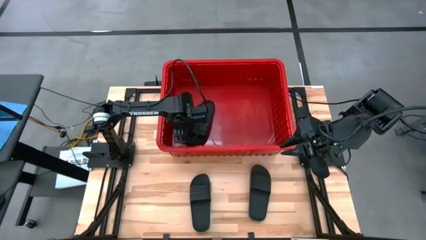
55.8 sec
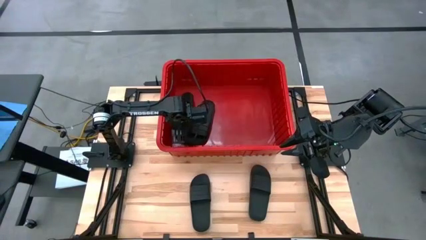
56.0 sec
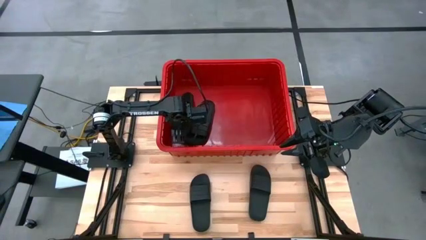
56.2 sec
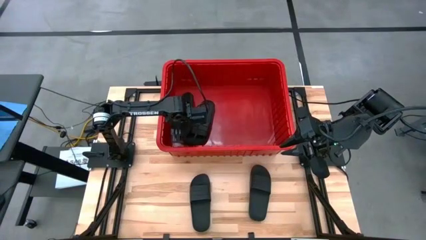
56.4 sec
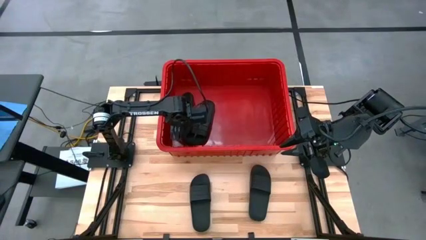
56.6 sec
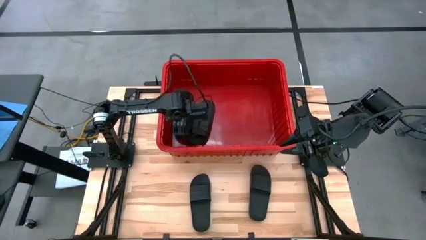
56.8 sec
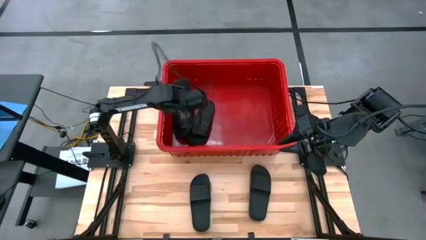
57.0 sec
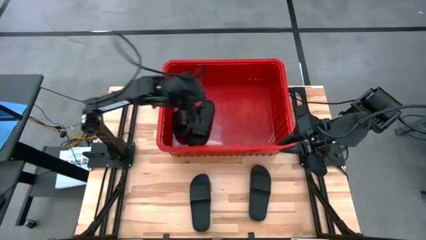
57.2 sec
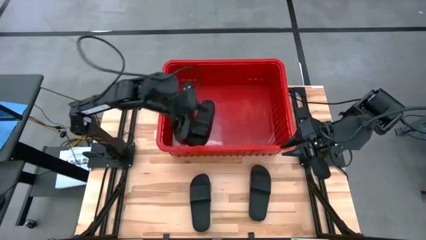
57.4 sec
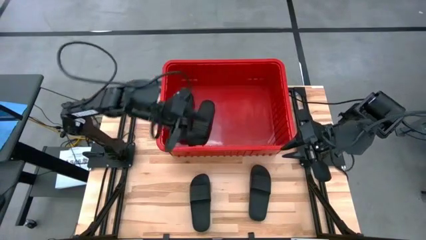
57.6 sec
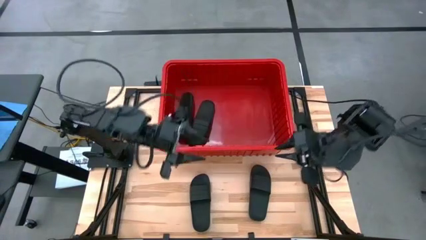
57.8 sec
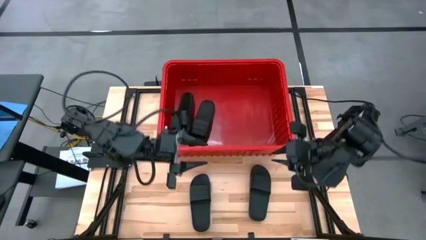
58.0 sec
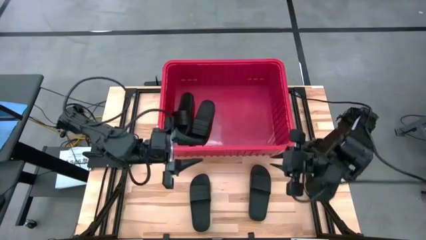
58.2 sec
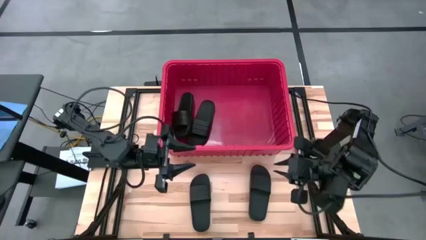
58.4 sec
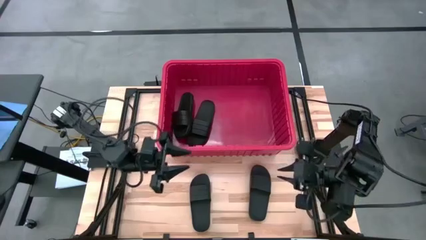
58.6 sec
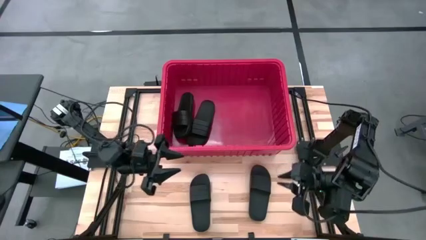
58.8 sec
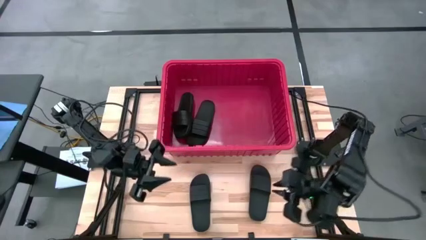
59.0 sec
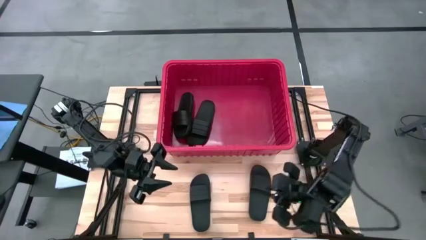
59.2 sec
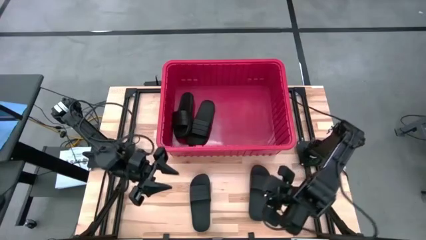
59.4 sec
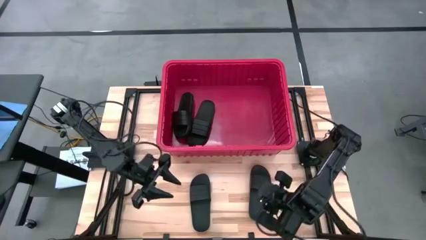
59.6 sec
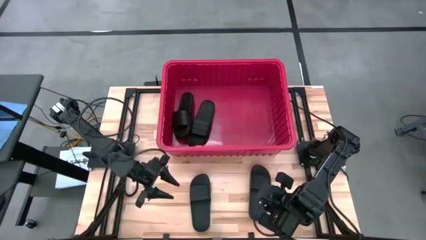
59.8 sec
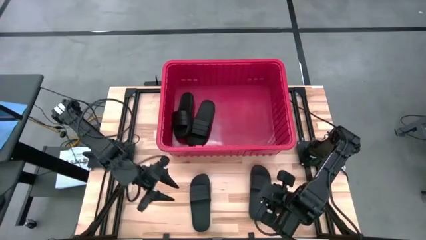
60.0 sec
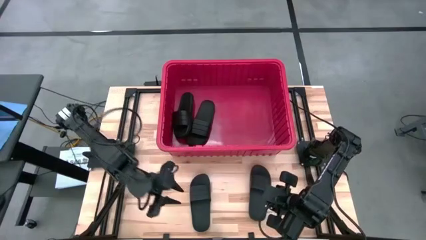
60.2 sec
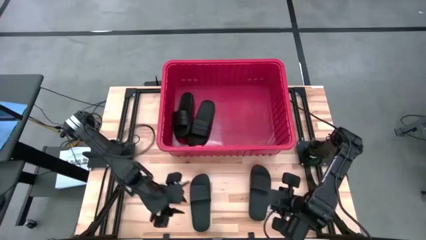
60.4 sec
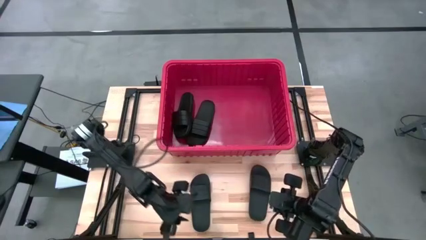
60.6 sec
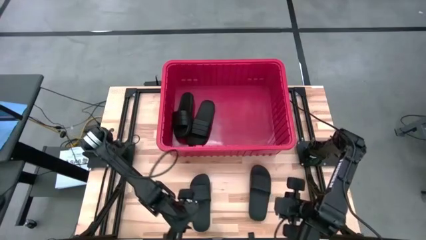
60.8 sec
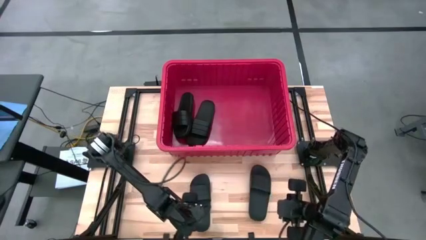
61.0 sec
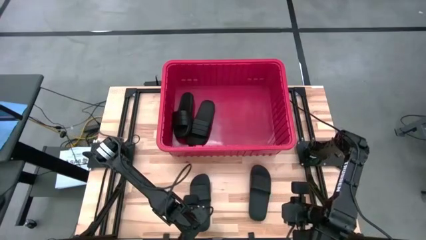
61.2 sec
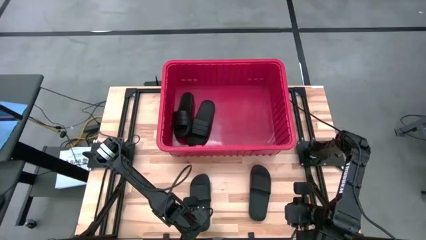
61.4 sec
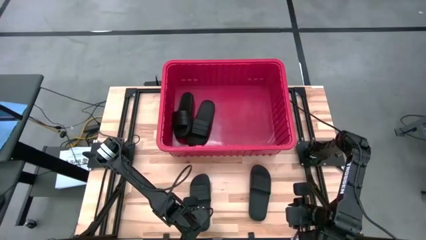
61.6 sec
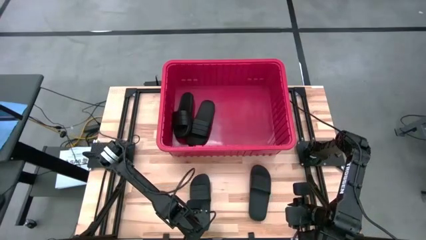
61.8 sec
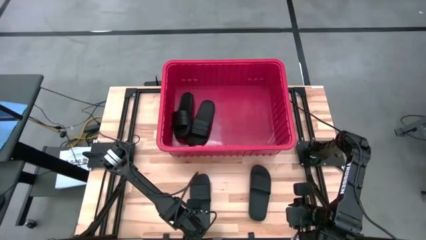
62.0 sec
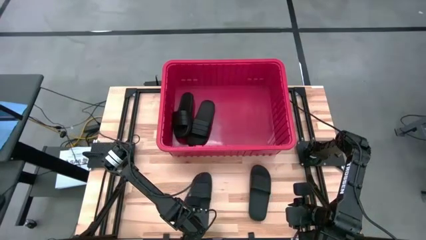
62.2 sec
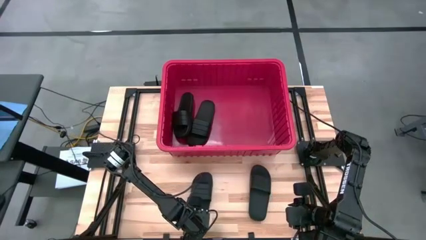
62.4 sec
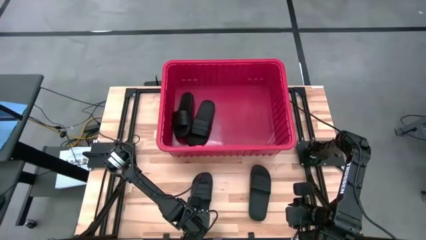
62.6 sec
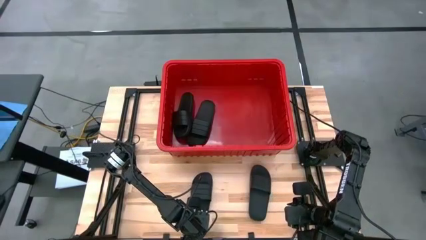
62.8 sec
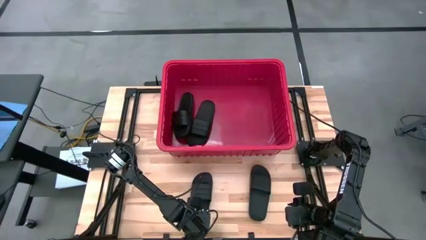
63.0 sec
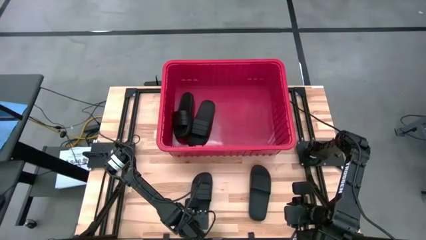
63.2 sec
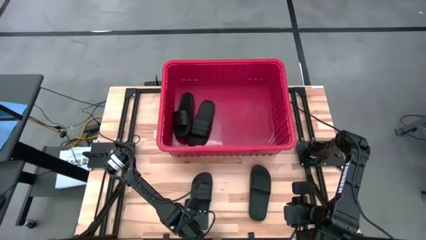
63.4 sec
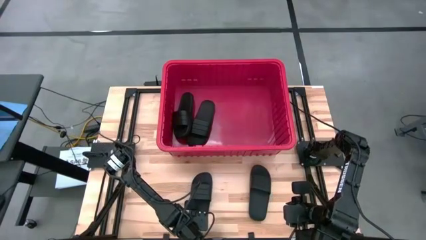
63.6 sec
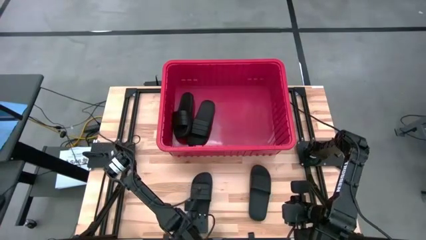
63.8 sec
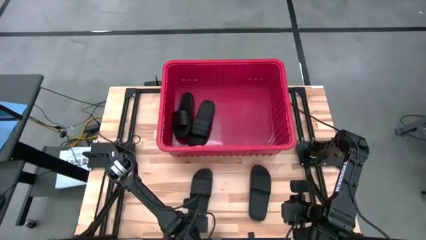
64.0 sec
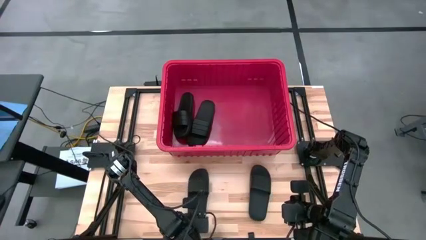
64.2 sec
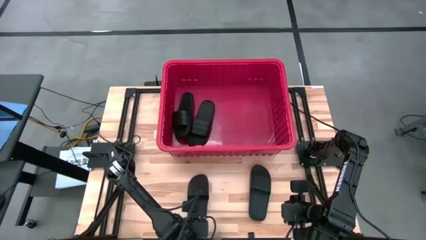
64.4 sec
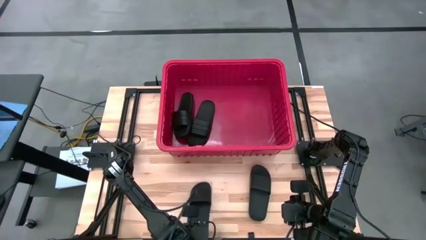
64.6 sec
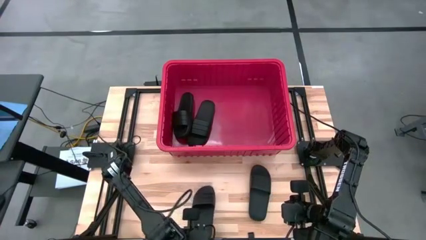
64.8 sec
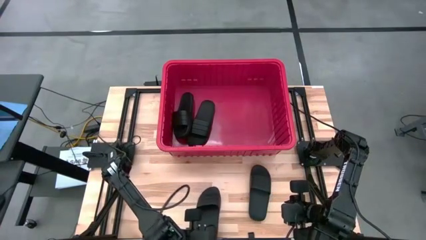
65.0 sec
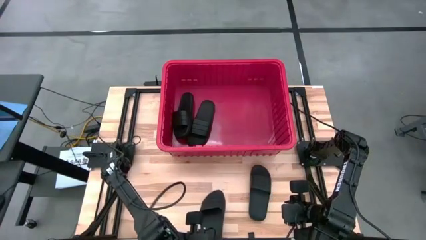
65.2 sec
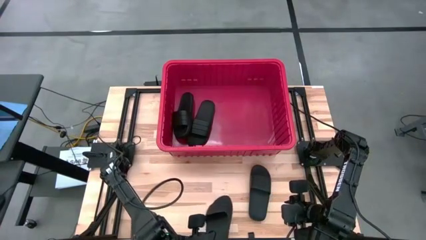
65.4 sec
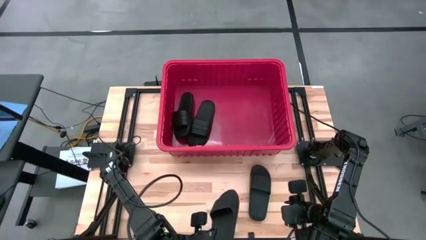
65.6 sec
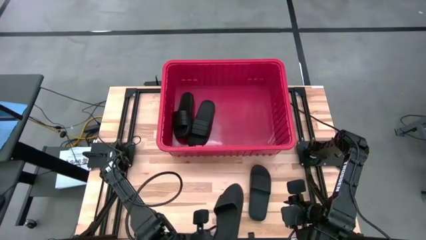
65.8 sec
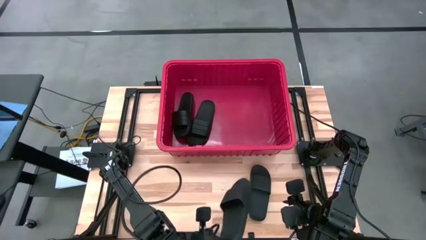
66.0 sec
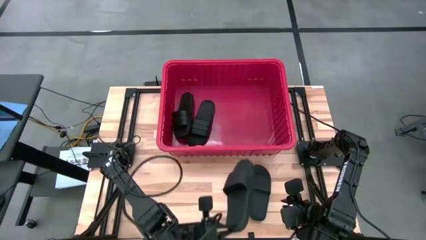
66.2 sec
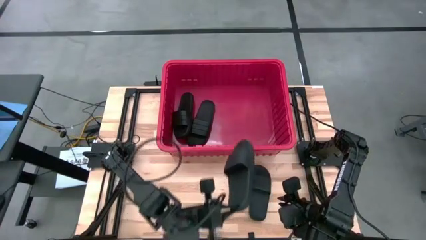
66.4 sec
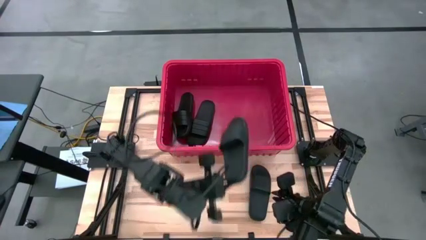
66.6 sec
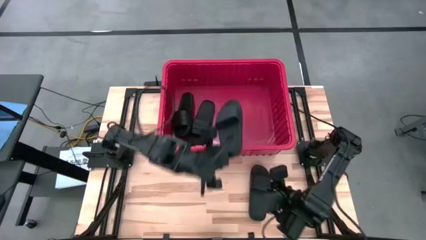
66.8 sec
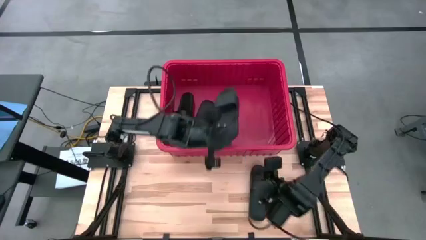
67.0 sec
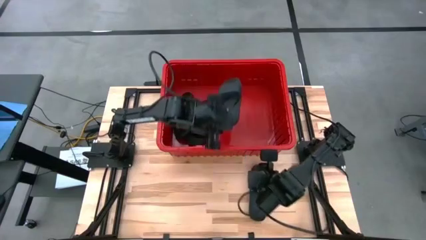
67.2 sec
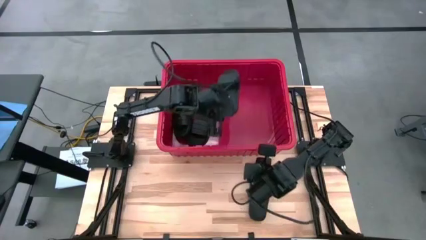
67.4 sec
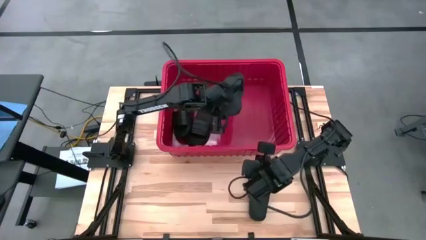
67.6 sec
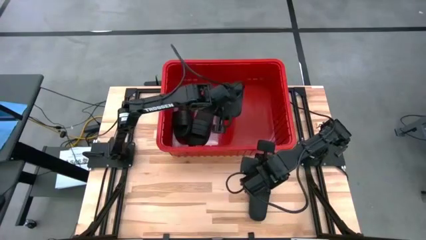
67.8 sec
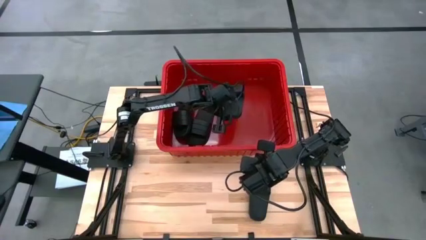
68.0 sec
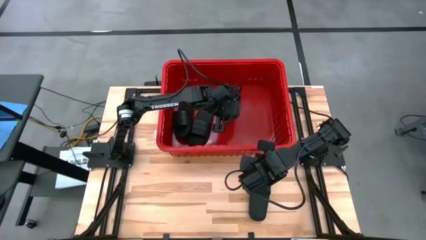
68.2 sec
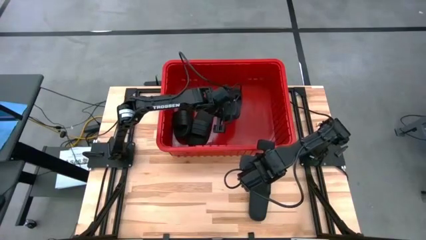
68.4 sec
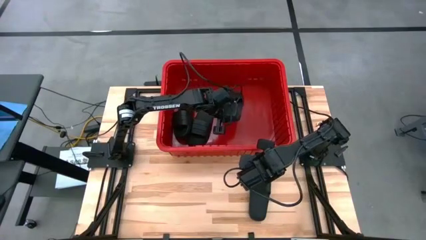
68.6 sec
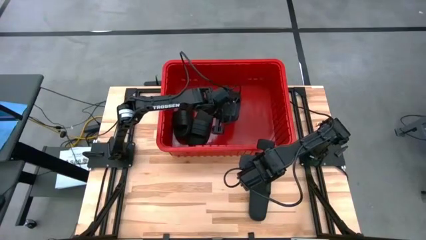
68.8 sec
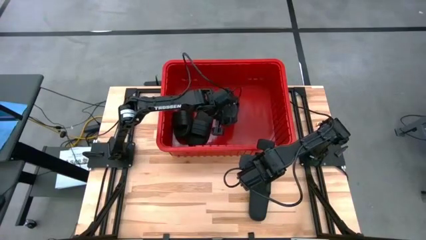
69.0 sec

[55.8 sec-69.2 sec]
Task: Pick and place slides into bin
Put the black slide into the red bin
